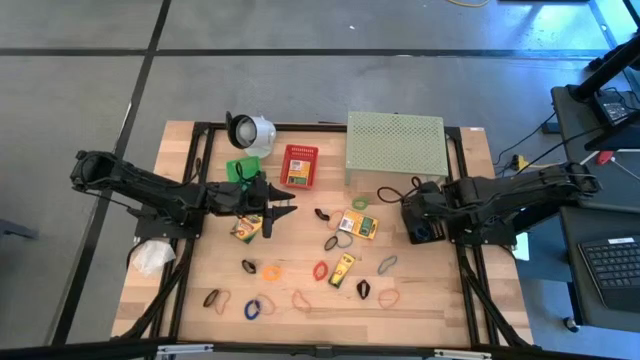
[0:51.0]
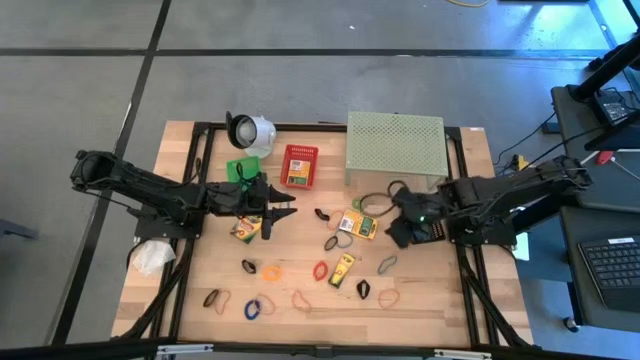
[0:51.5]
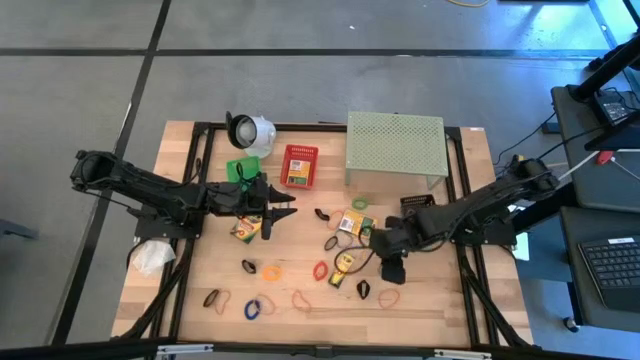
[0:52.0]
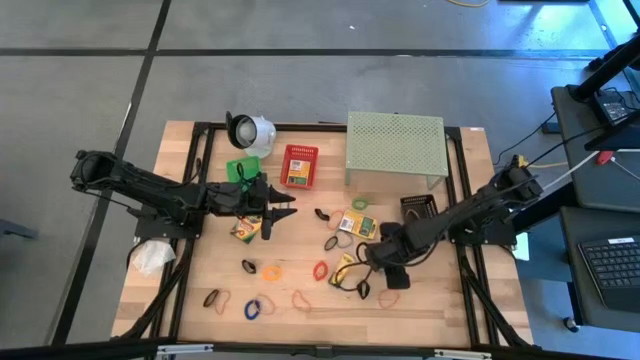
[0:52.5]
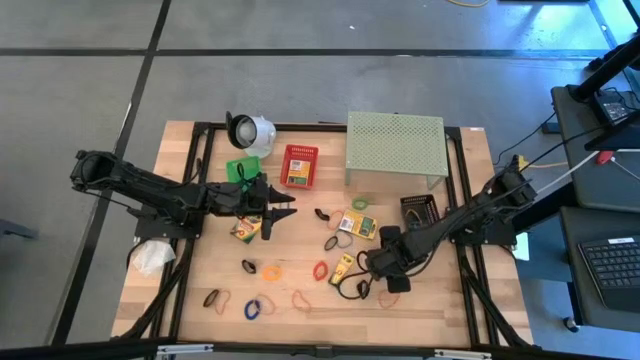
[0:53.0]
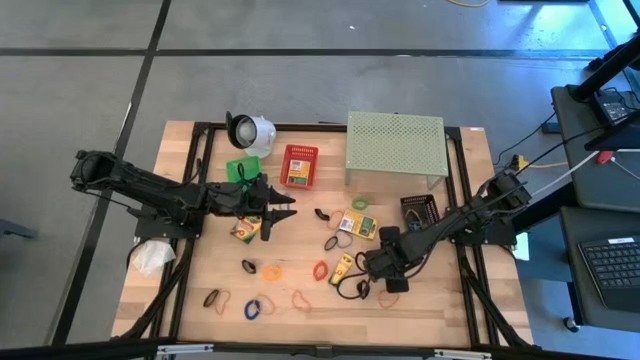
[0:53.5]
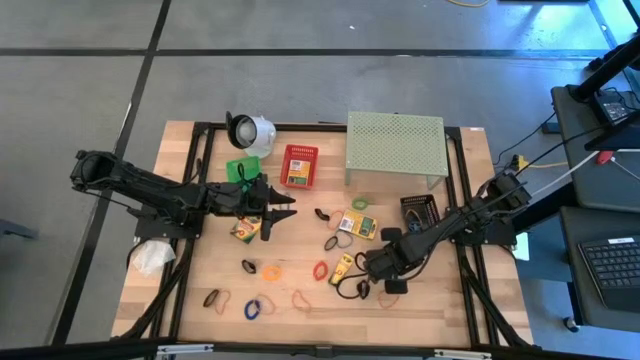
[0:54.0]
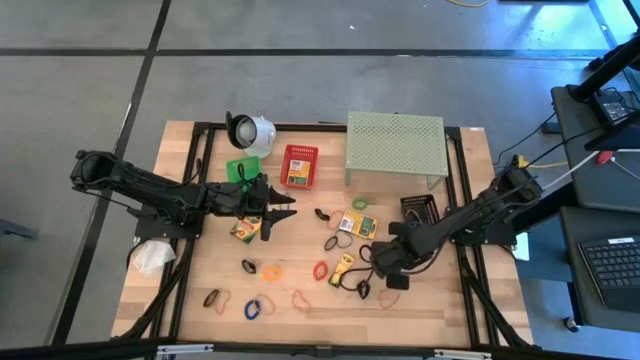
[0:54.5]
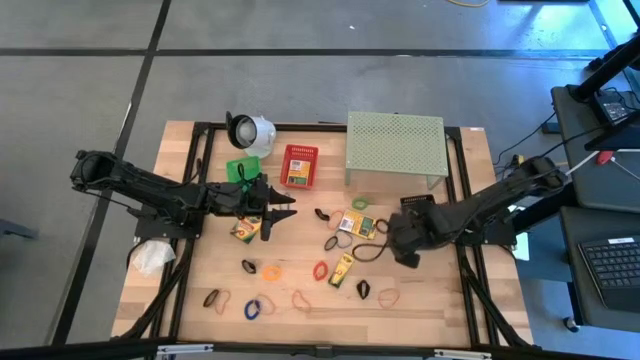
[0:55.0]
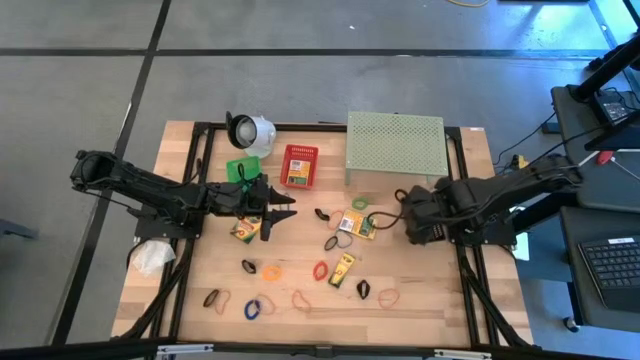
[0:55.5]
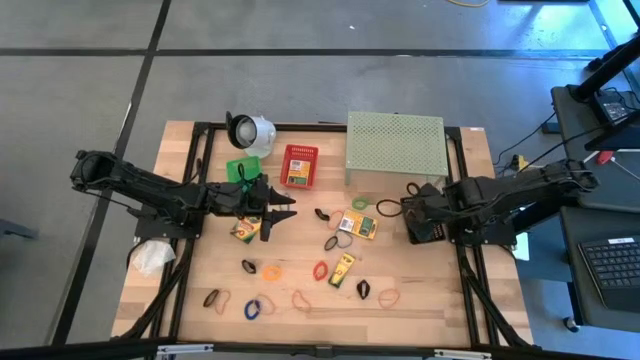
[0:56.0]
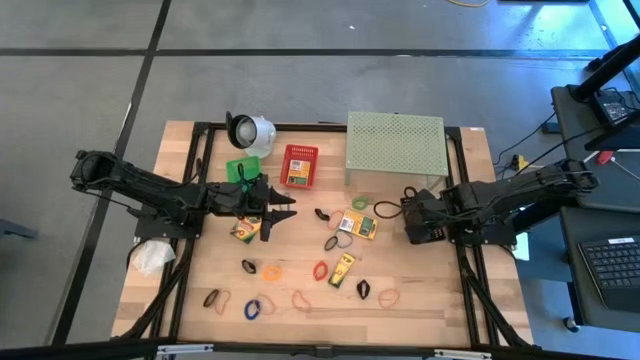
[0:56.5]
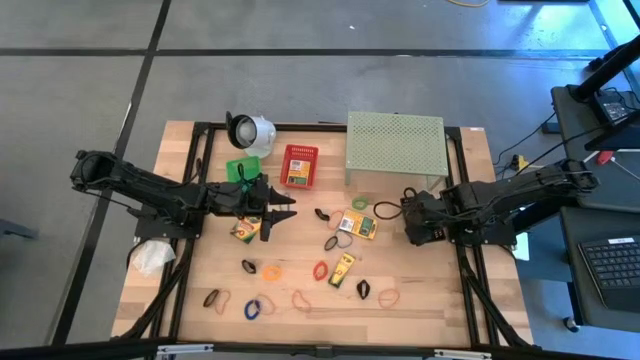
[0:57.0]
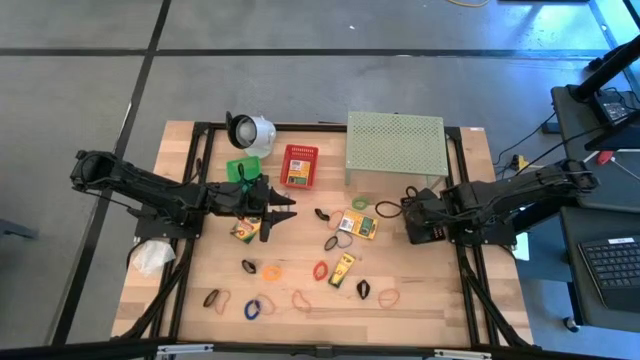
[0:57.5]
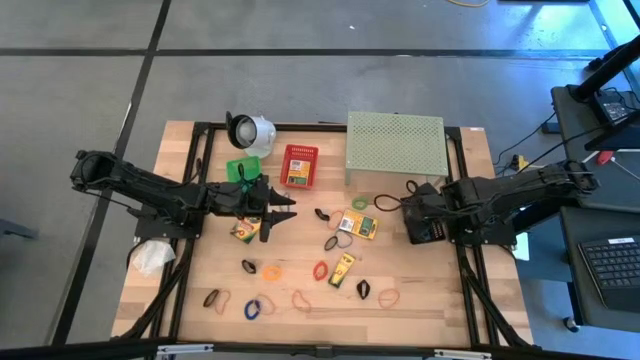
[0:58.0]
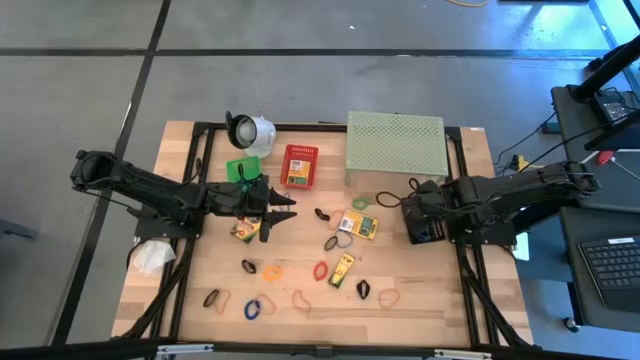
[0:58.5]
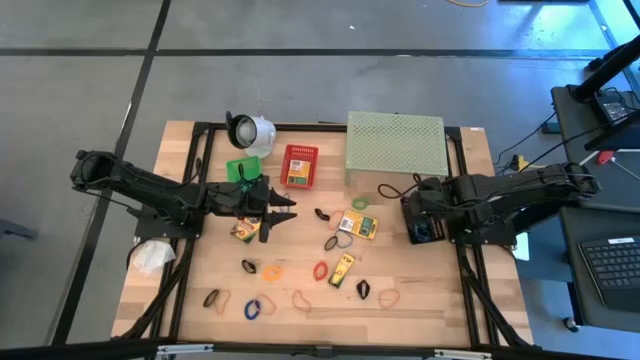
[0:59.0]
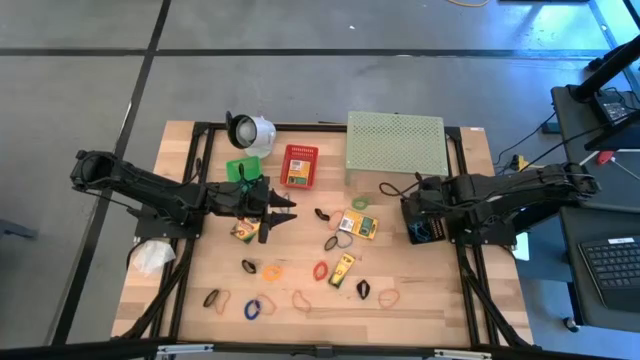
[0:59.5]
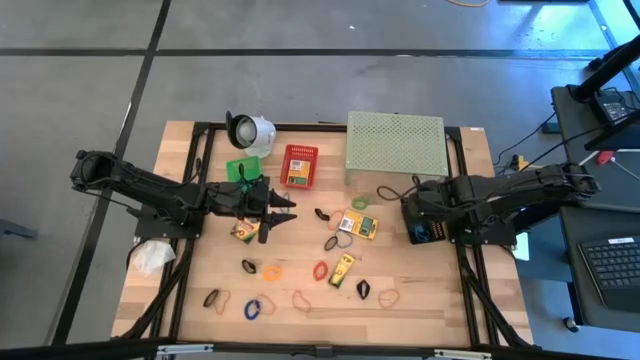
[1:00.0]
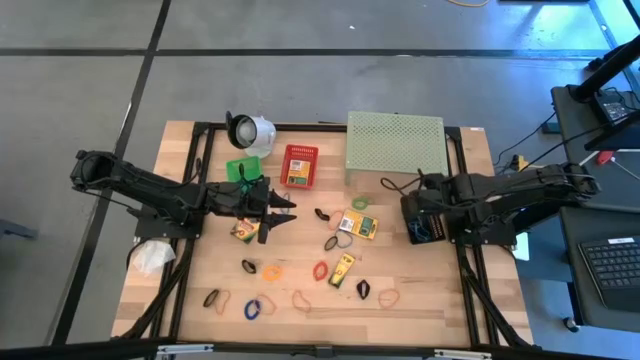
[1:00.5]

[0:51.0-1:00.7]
Task: Pick & Place Office Desk Supplies
Put the blue rubber band into the black basket

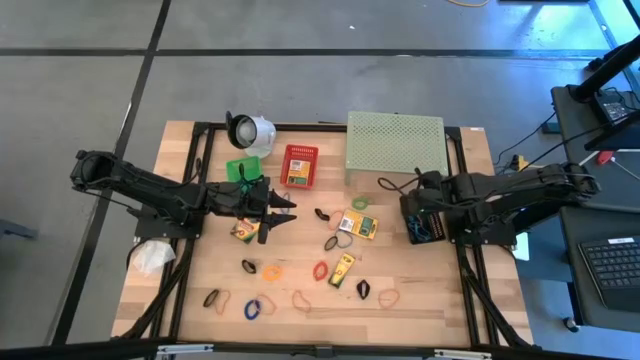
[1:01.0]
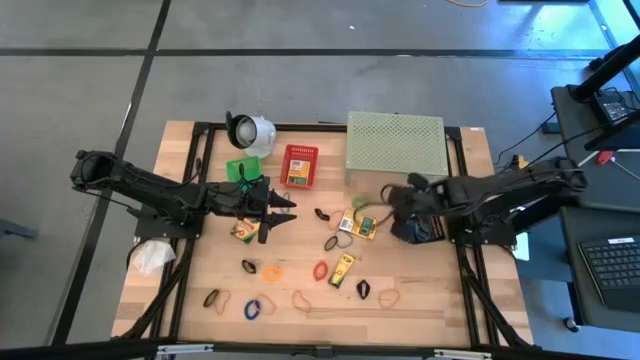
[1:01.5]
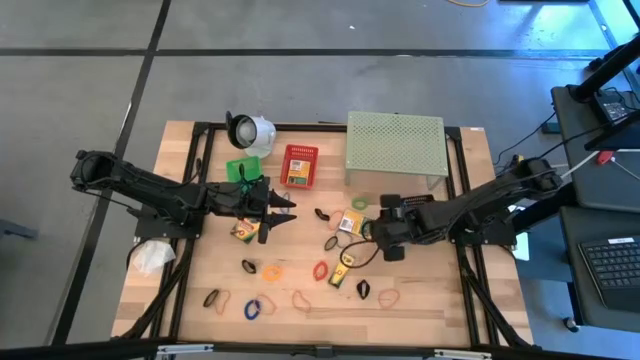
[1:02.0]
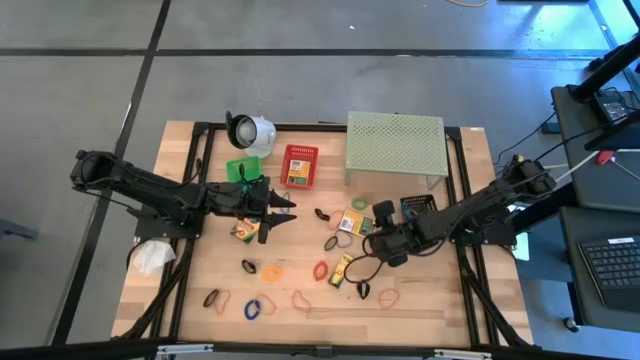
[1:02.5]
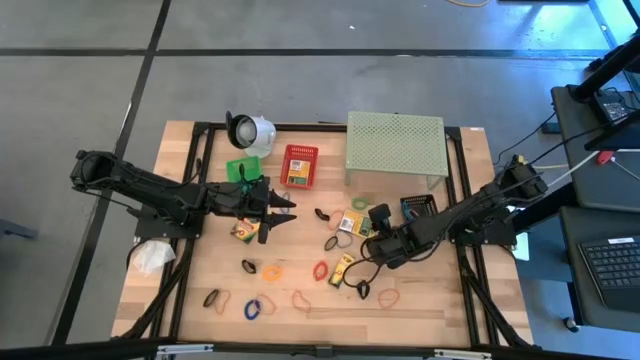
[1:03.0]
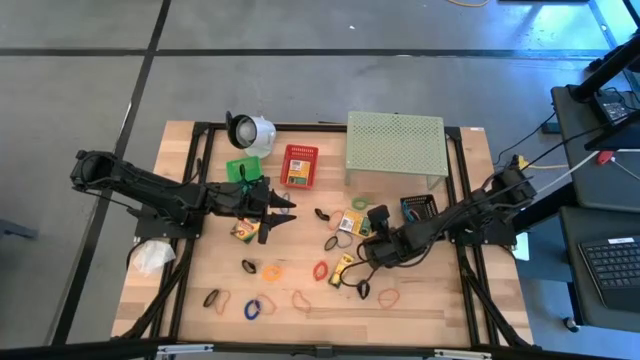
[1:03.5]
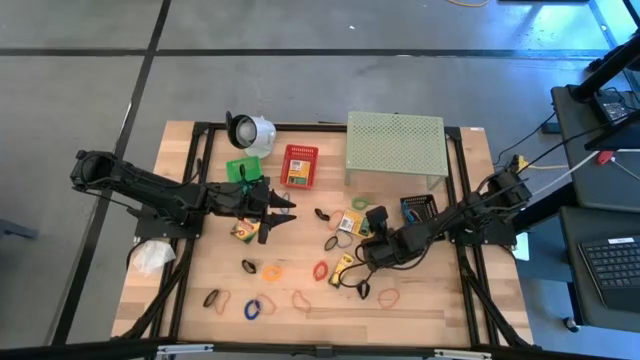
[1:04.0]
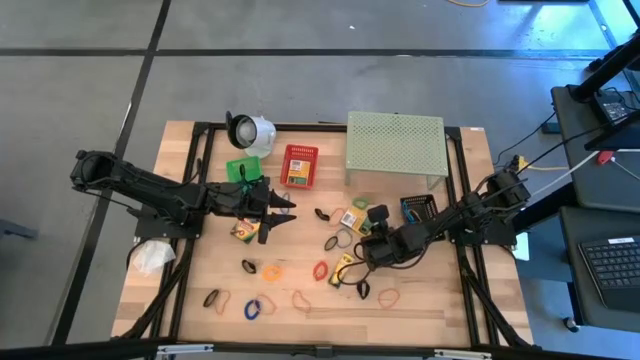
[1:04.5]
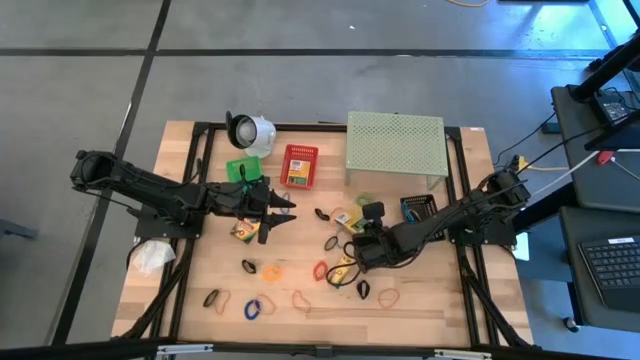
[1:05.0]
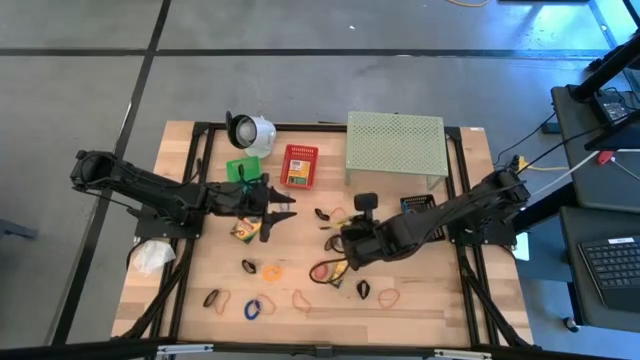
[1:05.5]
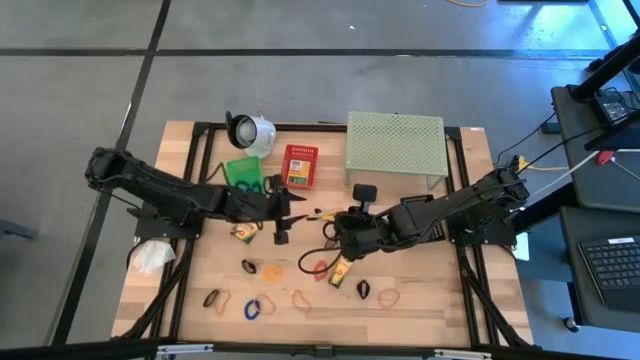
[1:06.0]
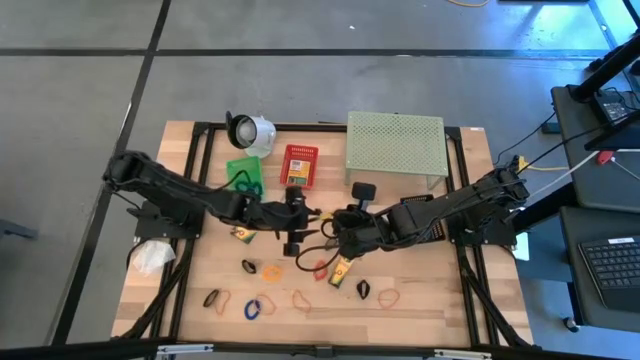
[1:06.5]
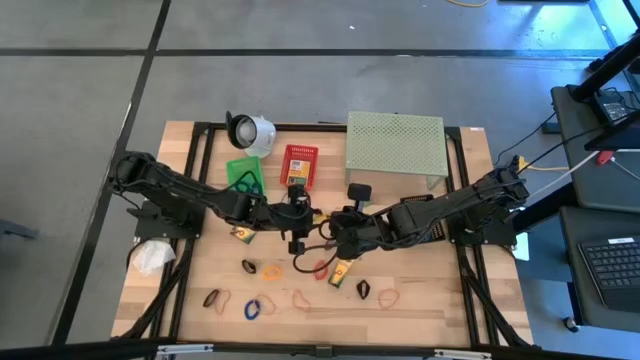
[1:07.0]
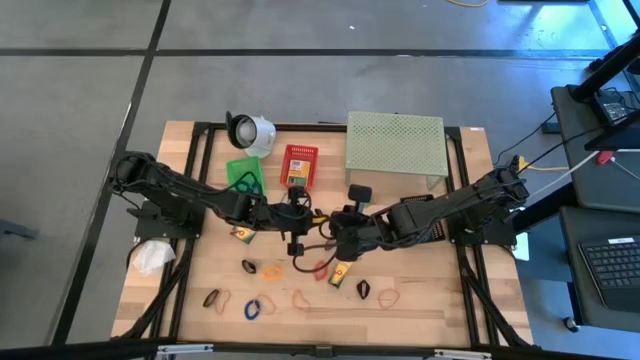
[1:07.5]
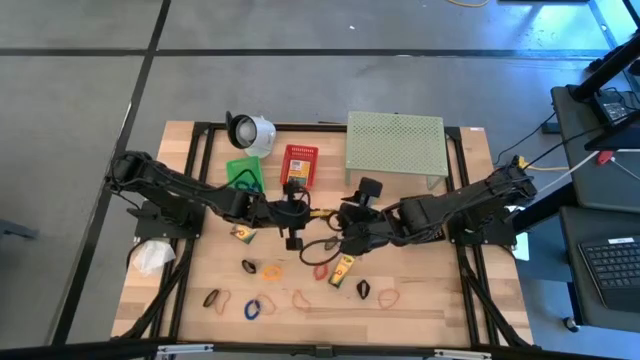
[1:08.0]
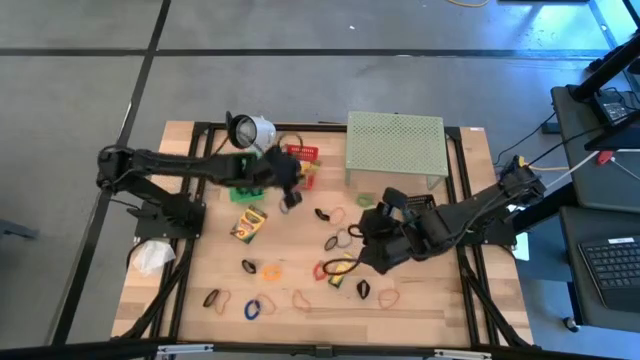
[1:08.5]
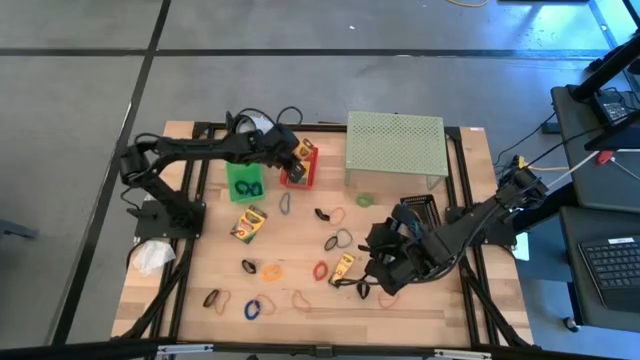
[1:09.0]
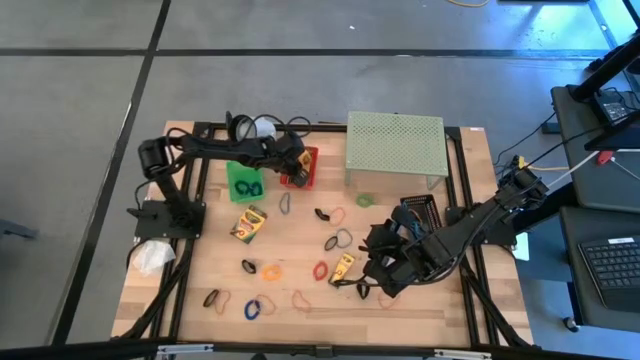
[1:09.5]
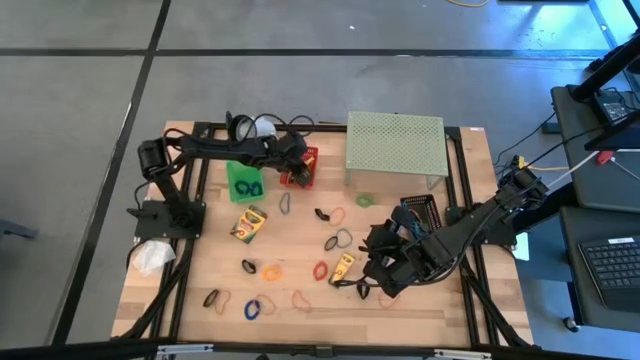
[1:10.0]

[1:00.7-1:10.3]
Put the crayons box into the red basket
